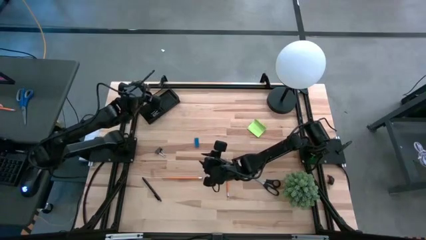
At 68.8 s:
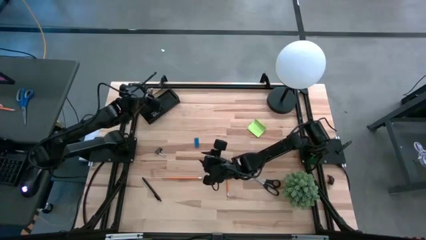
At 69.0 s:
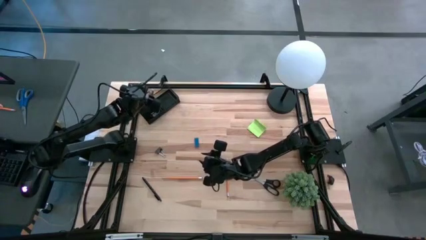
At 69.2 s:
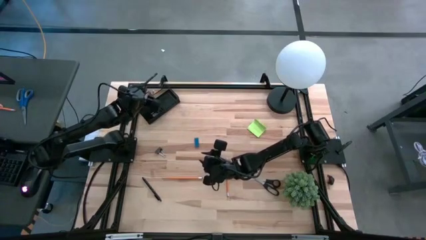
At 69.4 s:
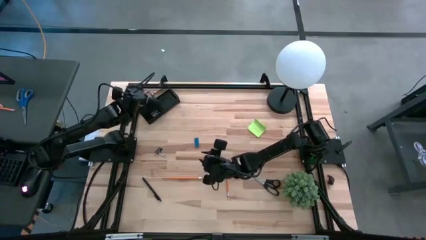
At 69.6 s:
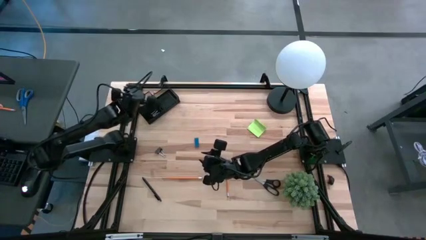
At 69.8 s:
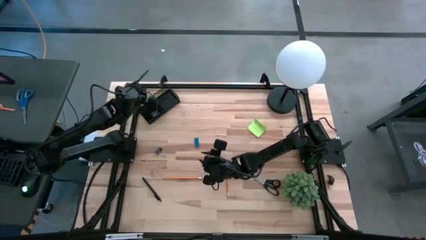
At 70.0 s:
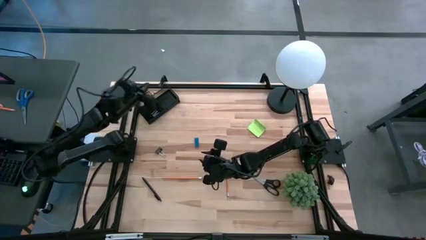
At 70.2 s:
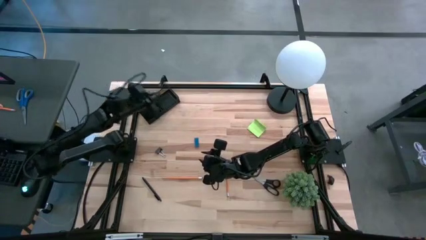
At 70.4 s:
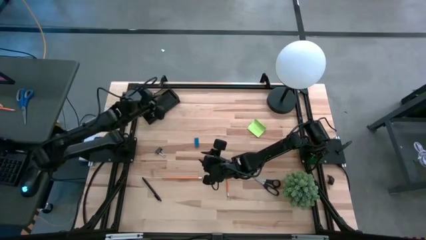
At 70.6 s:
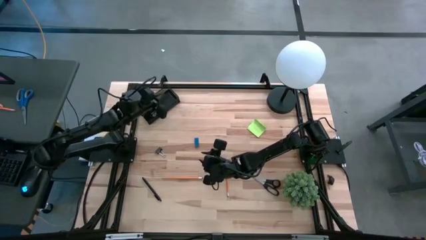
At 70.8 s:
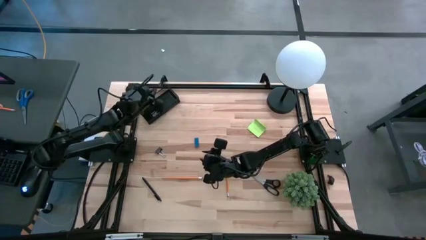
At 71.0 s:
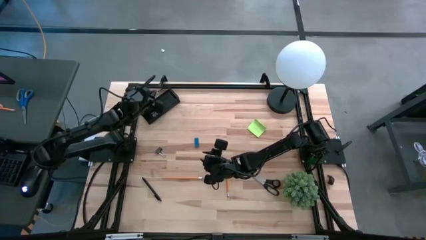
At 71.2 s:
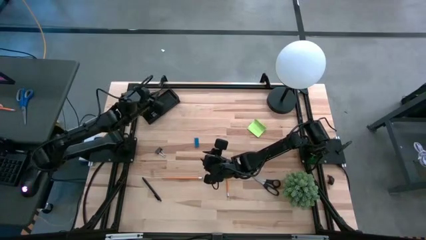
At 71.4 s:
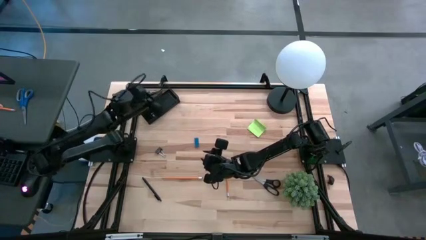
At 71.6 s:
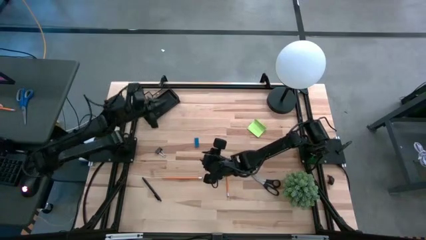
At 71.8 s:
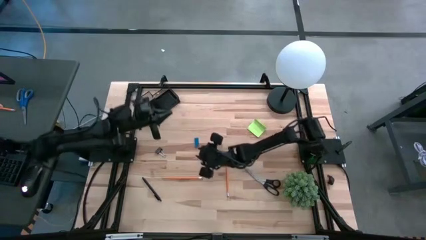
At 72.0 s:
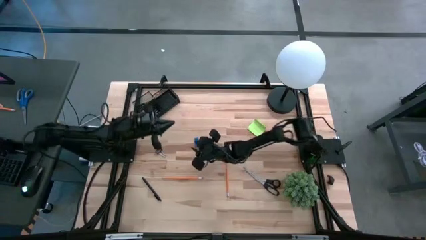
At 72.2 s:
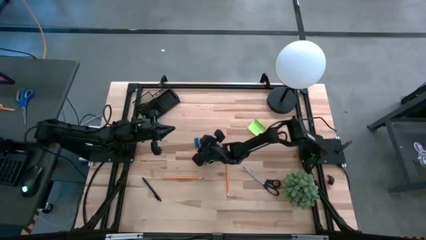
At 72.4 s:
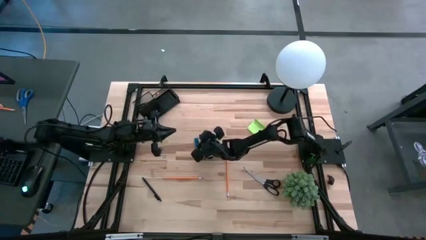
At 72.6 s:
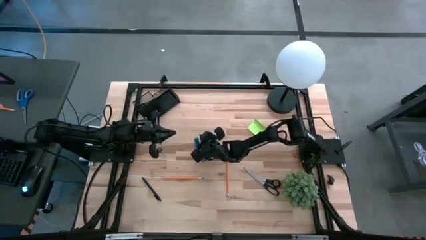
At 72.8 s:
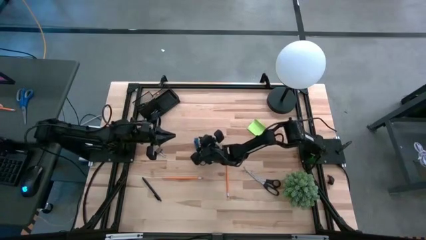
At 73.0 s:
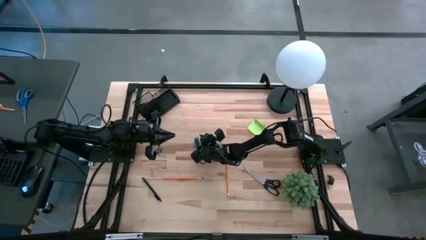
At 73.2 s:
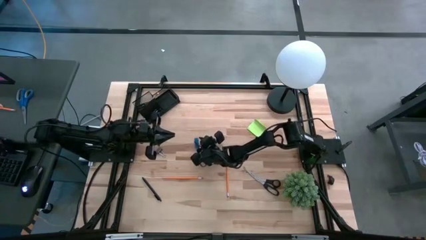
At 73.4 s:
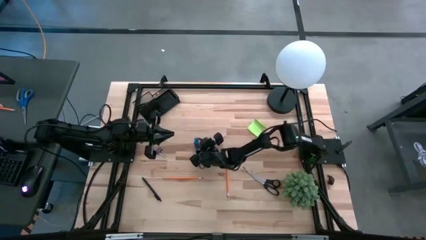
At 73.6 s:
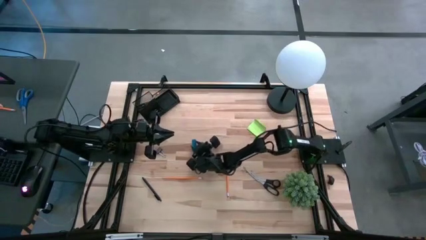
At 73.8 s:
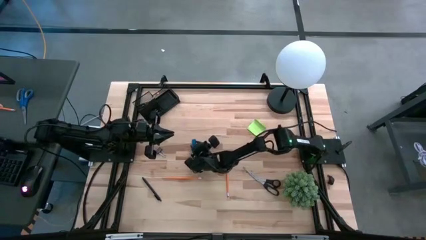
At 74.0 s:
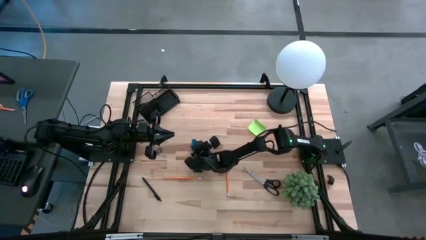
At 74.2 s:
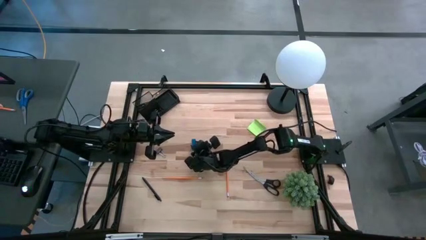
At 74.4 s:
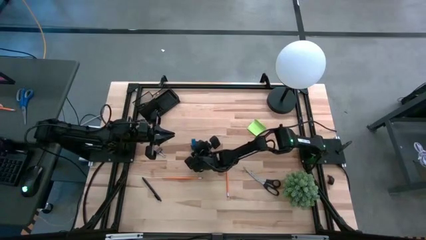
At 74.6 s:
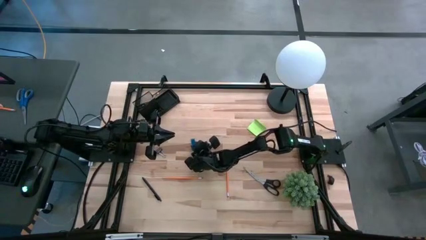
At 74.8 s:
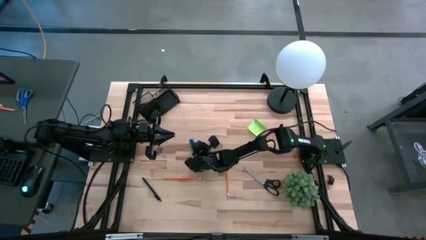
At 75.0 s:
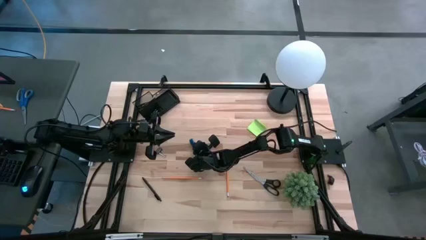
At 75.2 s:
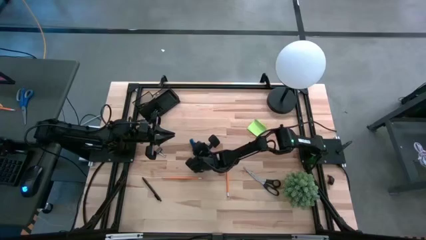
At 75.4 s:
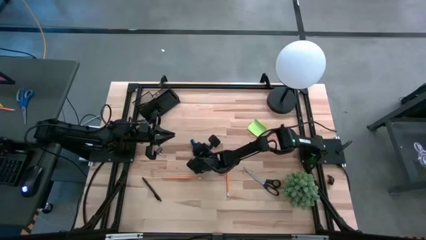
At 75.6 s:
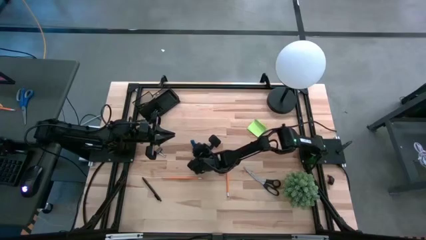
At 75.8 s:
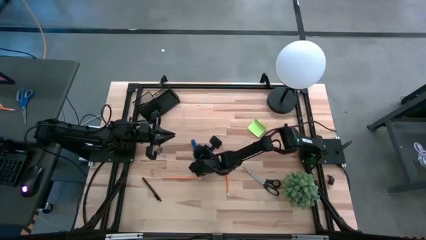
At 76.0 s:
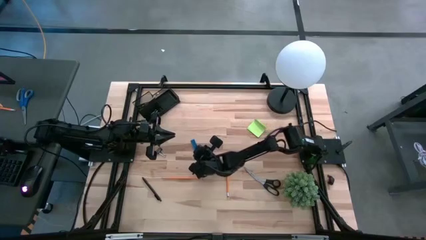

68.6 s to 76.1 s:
Task: Pick and place office supplies into organizer
Put the blue eraser into the bottom left section of the desk organizer

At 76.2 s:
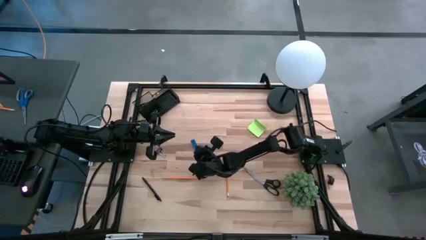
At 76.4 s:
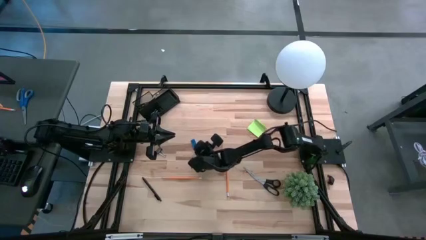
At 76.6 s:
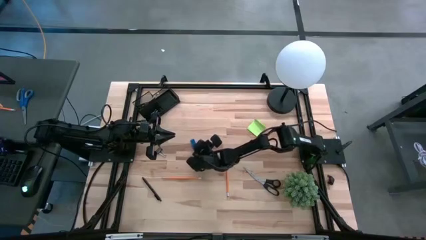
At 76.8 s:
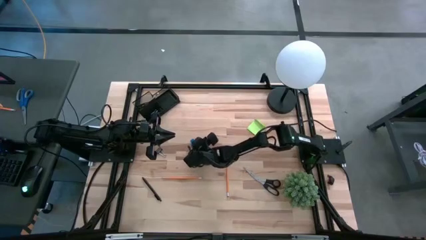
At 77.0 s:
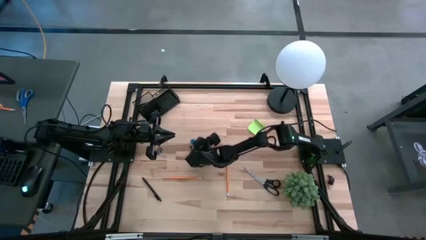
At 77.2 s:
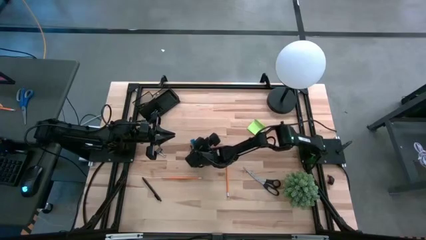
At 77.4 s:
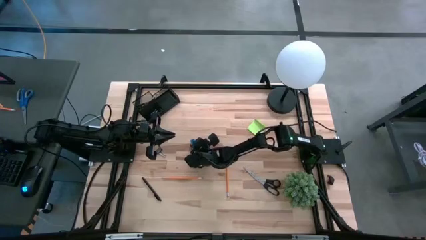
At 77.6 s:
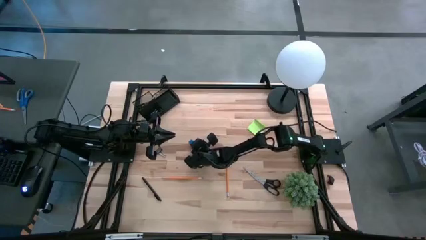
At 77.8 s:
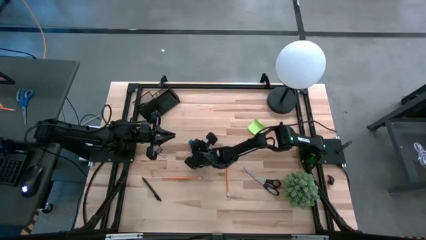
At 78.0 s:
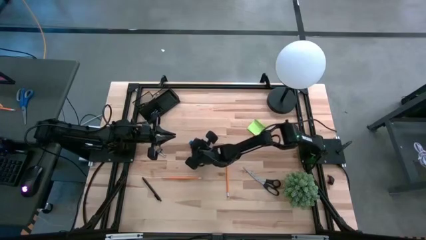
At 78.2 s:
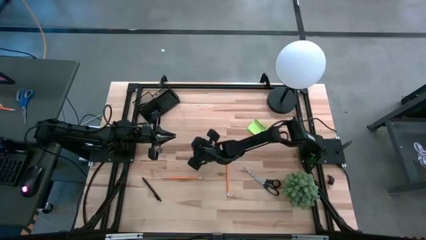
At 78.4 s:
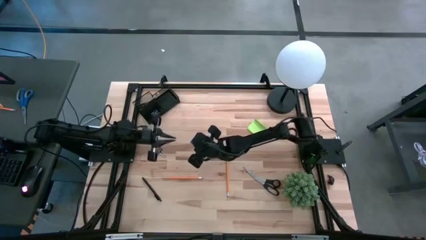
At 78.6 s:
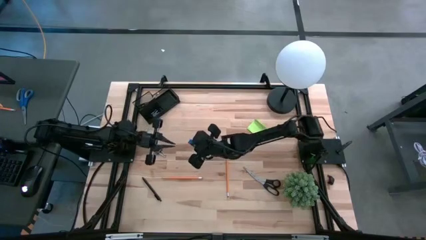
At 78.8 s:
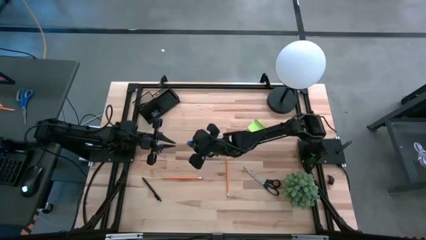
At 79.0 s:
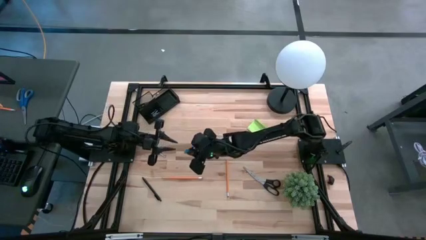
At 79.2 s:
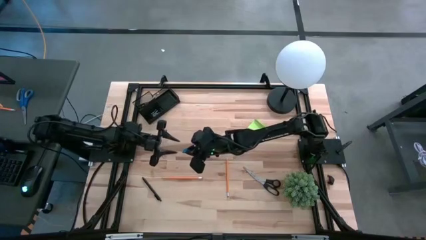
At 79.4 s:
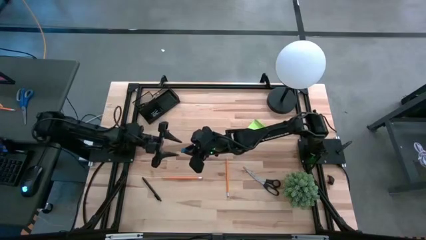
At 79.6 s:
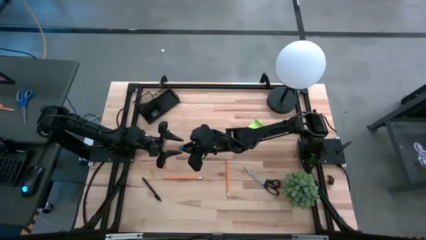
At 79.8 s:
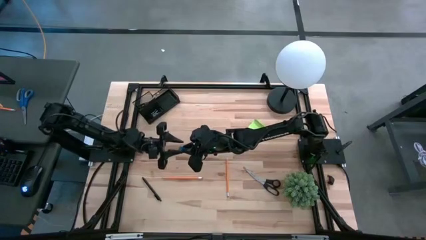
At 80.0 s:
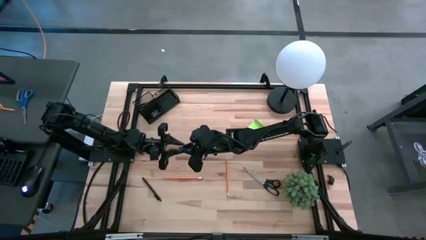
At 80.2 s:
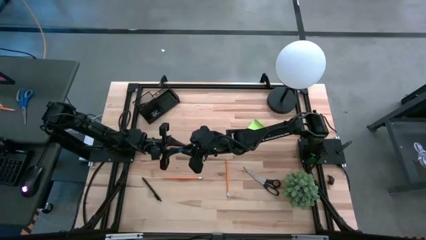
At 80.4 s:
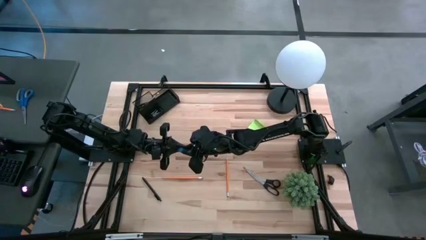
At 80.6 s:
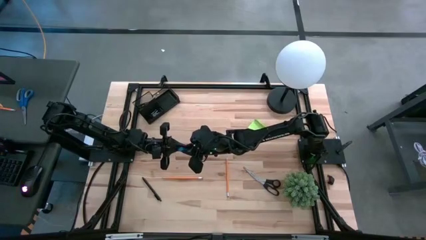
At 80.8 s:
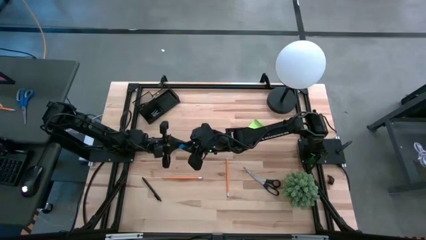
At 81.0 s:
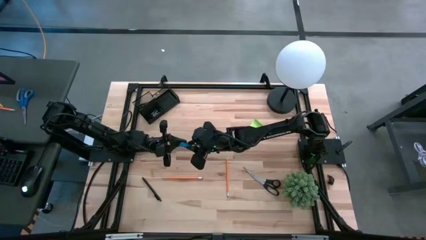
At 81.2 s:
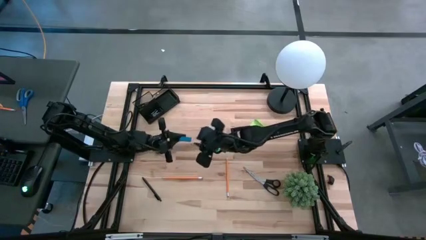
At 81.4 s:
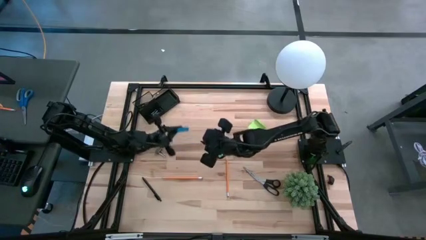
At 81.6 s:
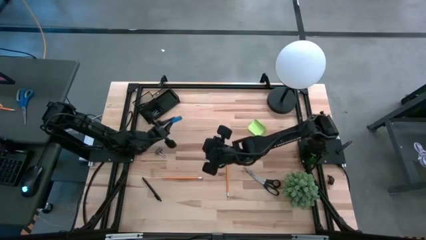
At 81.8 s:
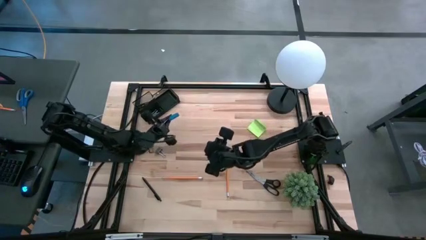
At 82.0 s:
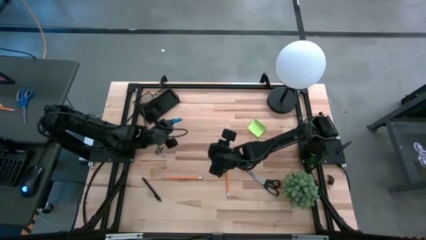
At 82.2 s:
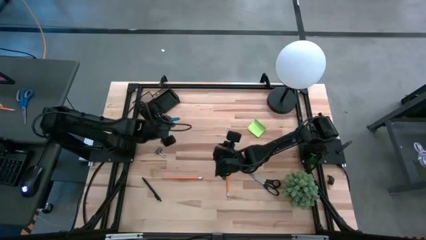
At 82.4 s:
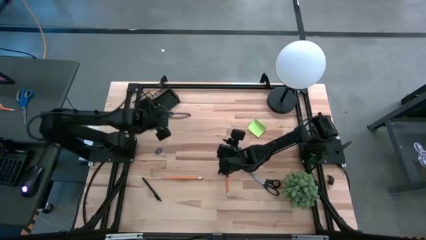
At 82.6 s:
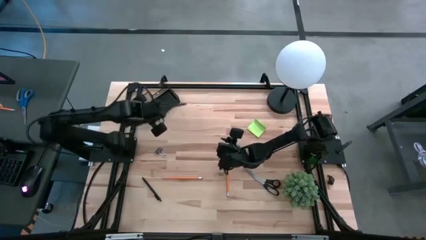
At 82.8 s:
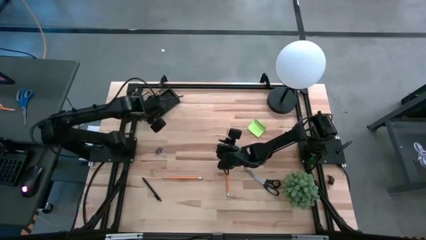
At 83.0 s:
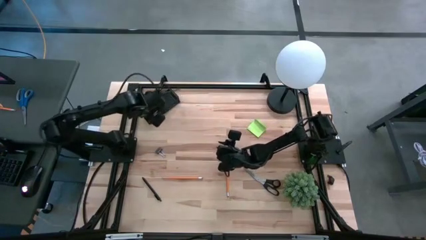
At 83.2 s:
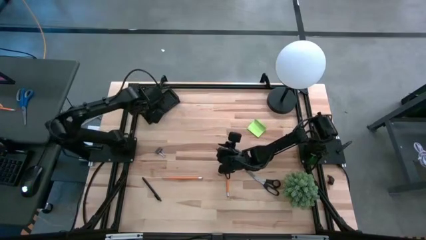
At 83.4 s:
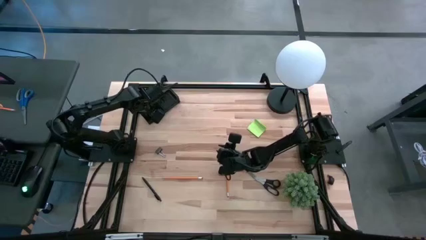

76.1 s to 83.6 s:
Put the blue eraser into the bottom left section of the desk organizer
